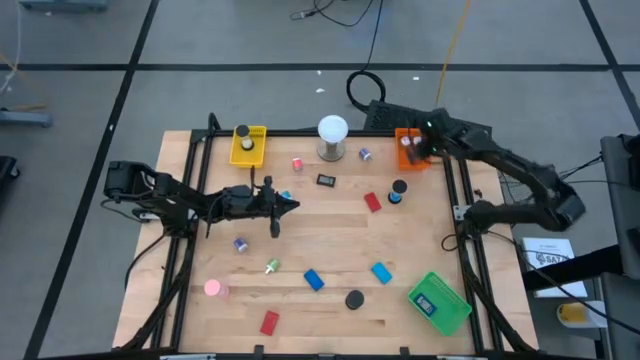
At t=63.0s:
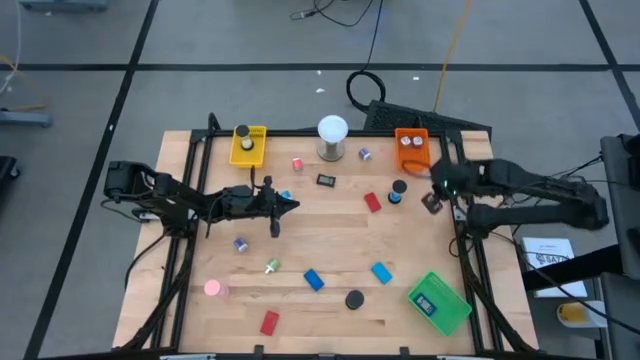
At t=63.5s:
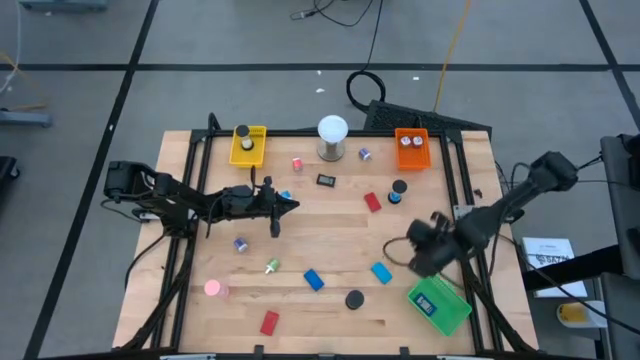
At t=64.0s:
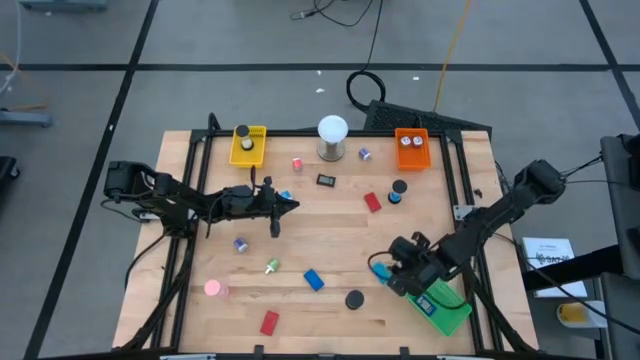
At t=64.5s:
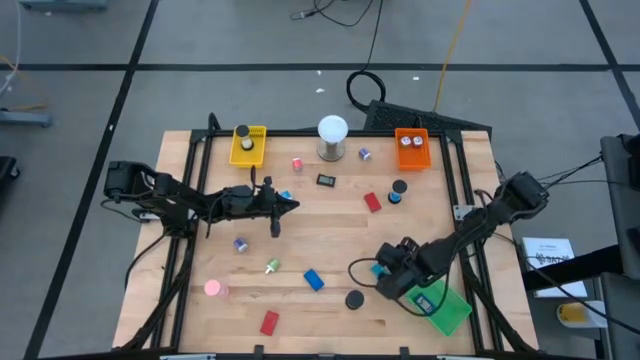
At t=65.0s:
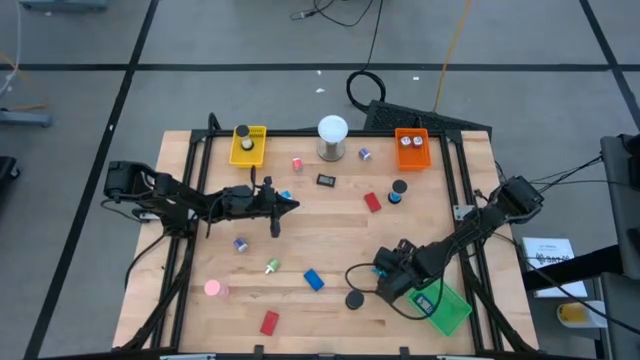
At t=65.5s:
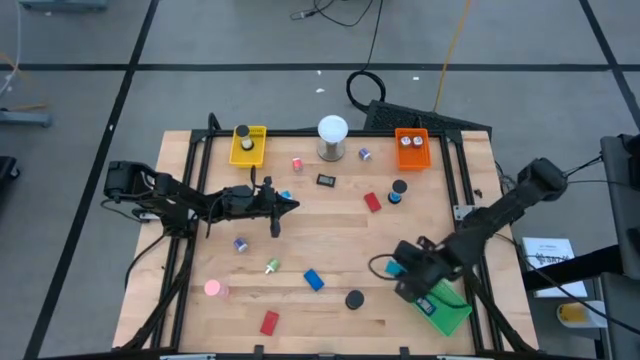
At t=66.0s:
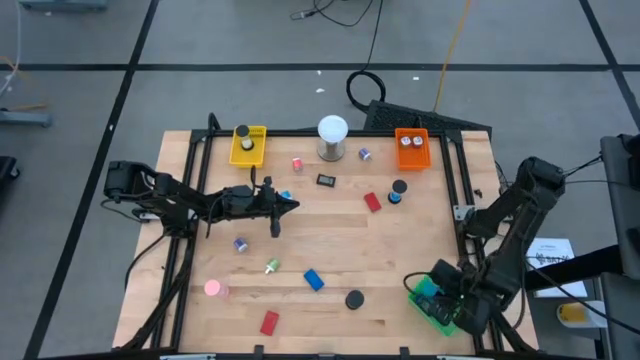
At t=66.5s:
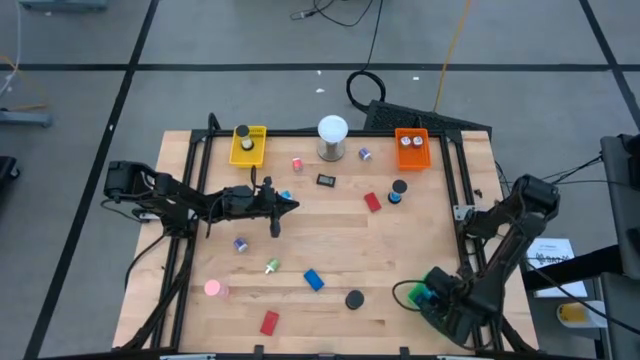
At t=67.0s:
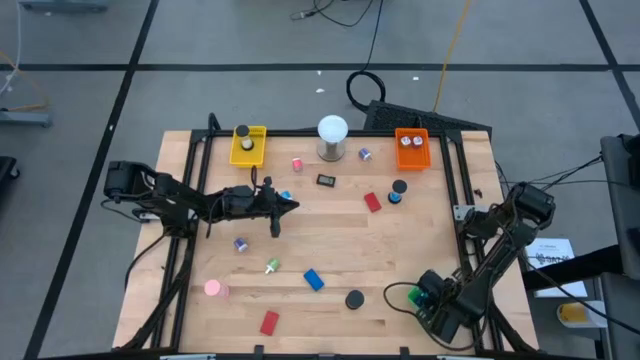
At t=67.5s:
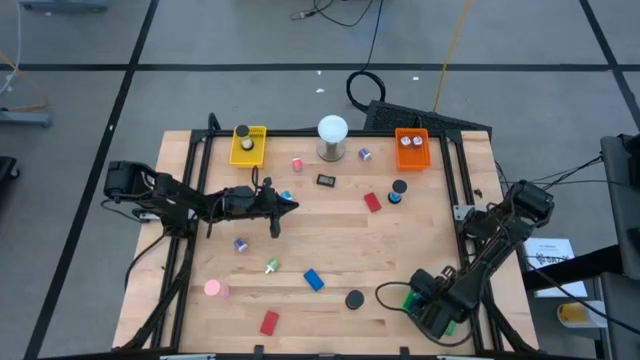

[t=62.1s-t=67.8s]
Task: Pick & Place Office items
Put the light blue digital clock into the green bin

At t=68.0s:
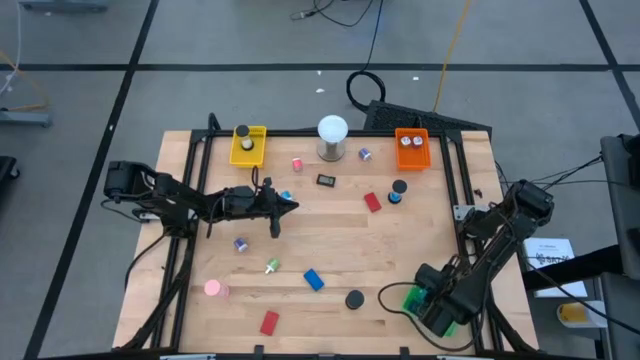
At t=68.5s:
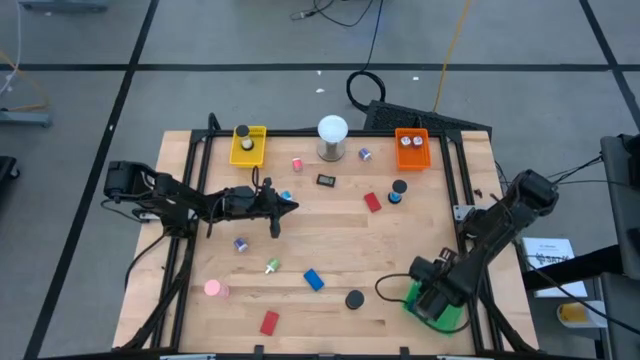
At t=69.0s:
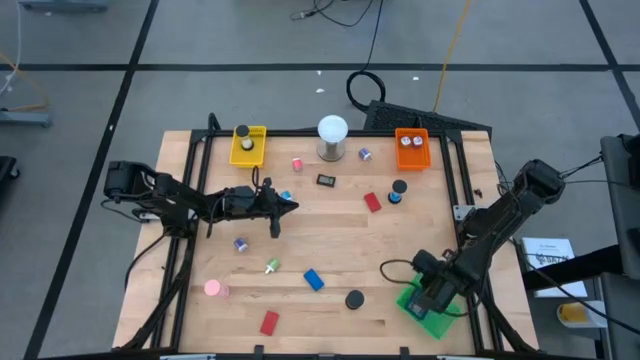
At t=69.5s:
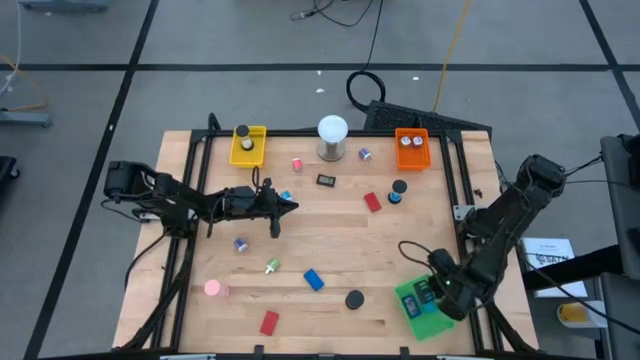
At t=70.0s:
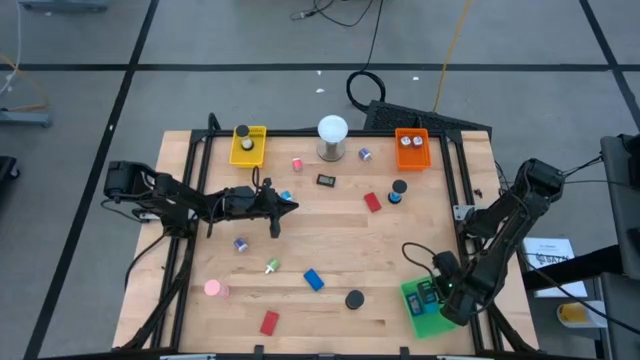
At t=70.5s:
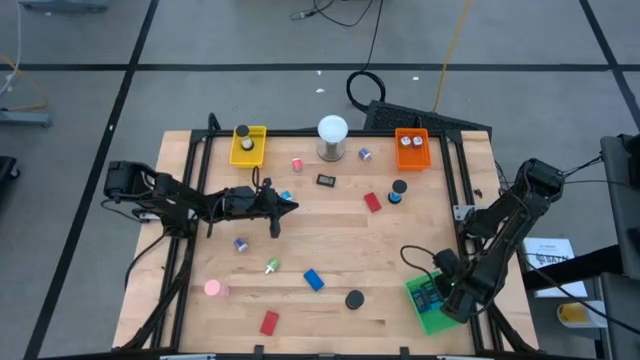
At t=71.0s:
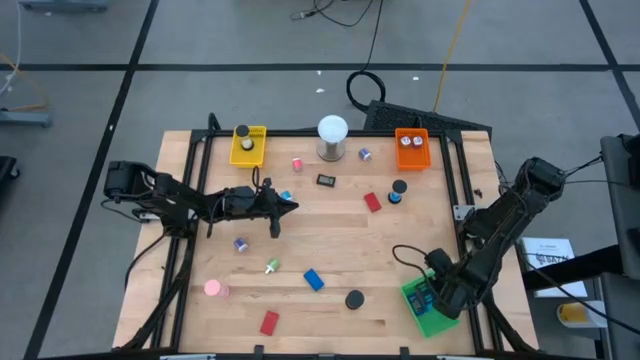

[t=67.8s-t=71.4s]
Adjust the green bin

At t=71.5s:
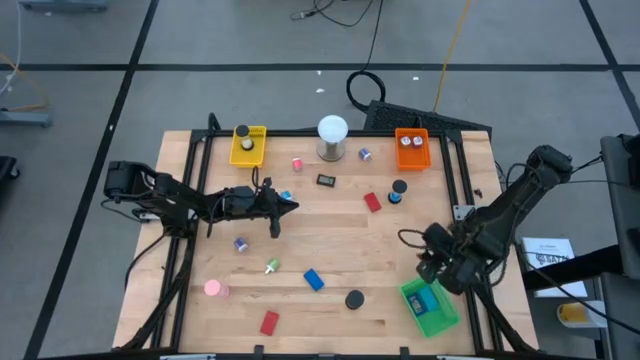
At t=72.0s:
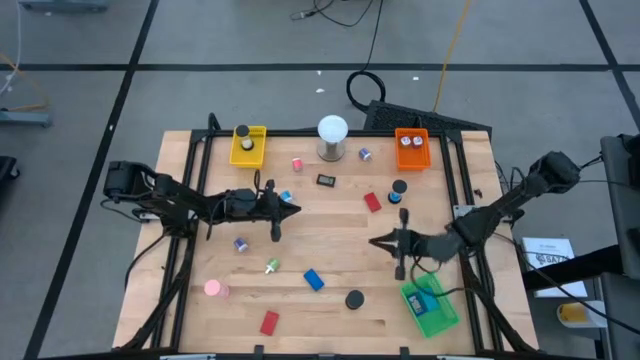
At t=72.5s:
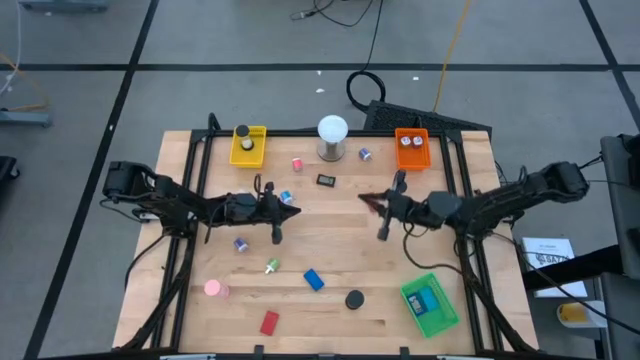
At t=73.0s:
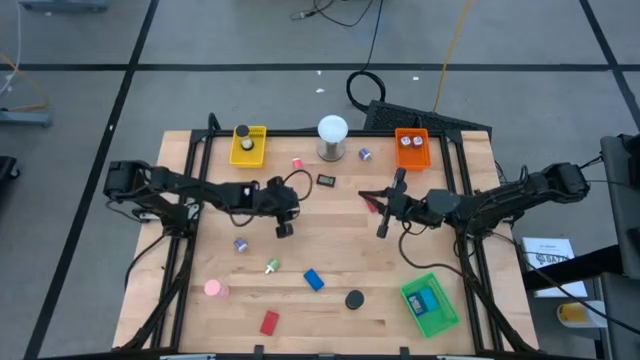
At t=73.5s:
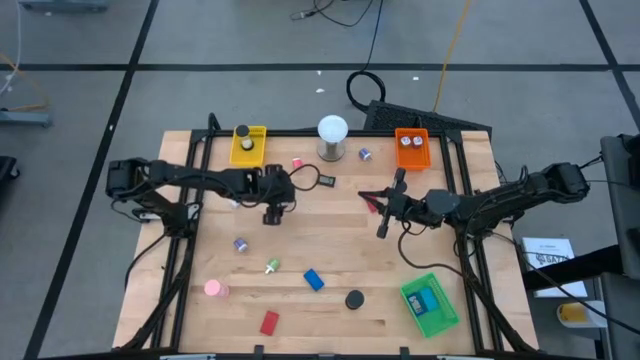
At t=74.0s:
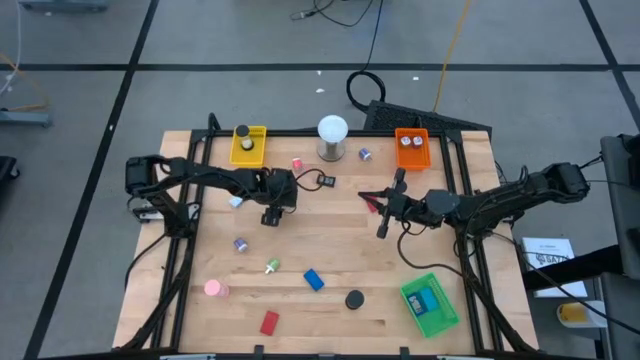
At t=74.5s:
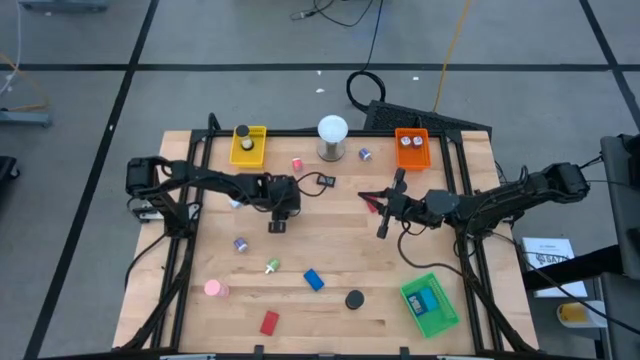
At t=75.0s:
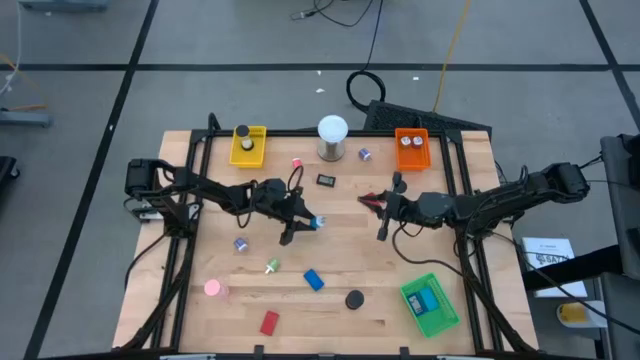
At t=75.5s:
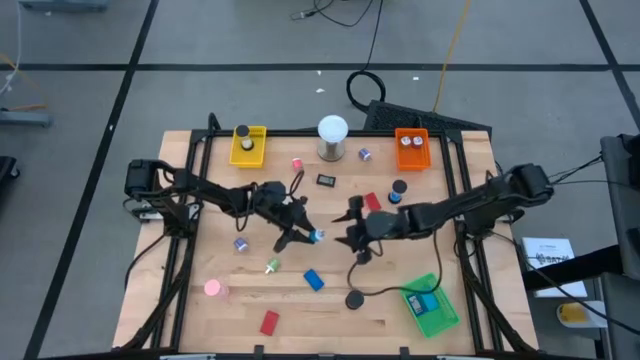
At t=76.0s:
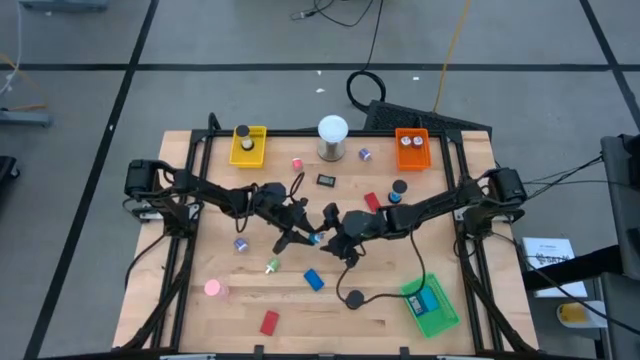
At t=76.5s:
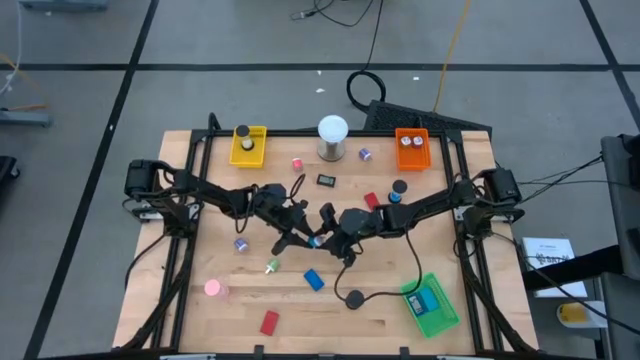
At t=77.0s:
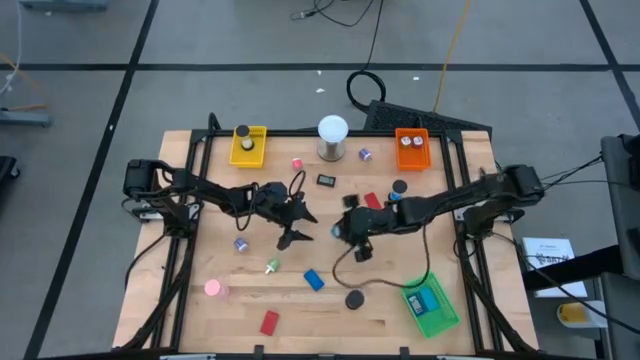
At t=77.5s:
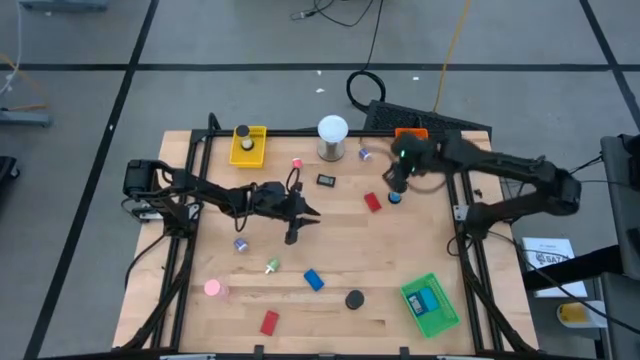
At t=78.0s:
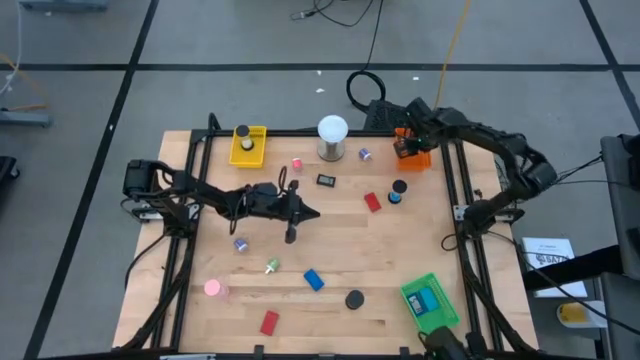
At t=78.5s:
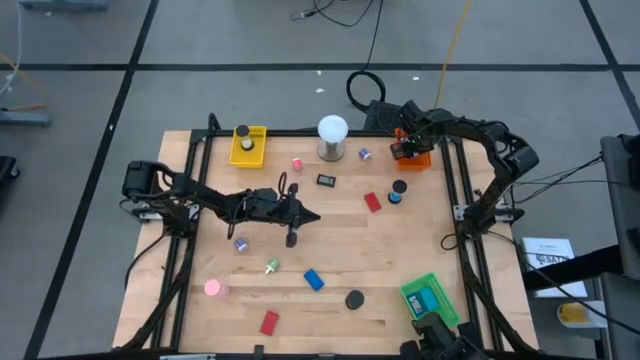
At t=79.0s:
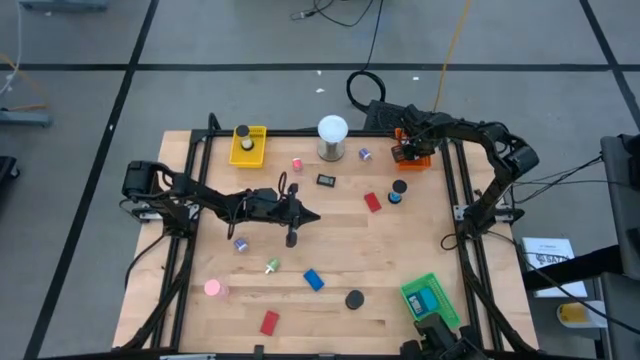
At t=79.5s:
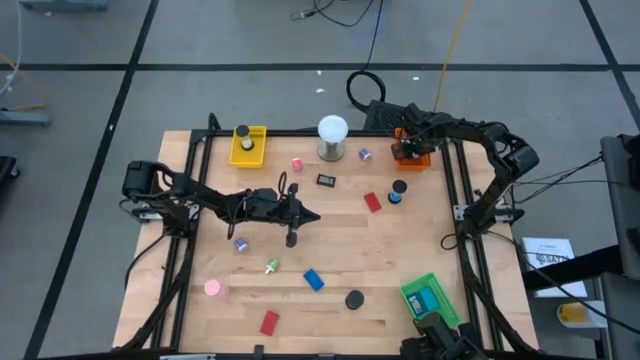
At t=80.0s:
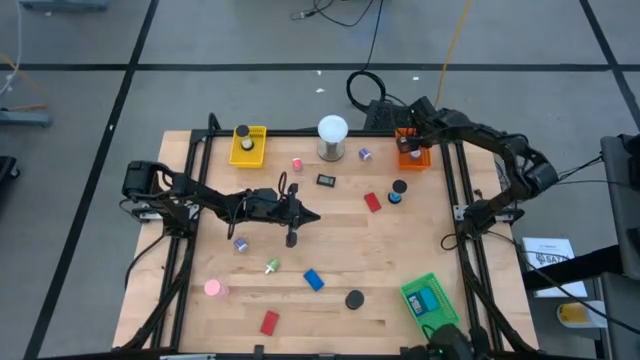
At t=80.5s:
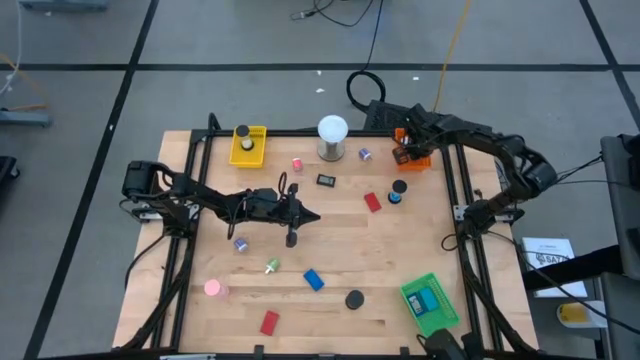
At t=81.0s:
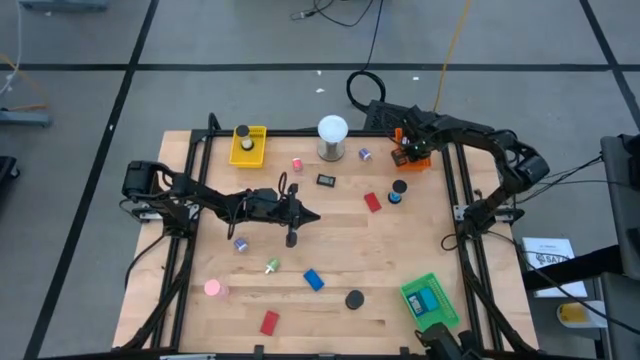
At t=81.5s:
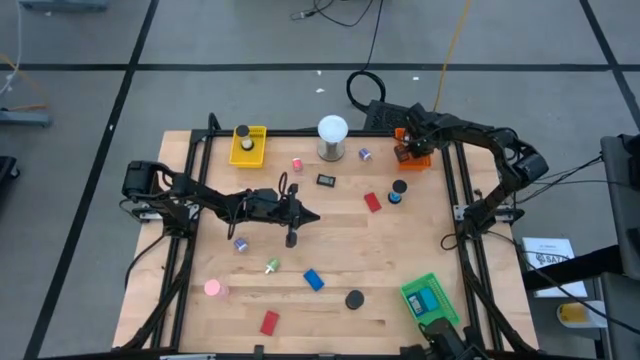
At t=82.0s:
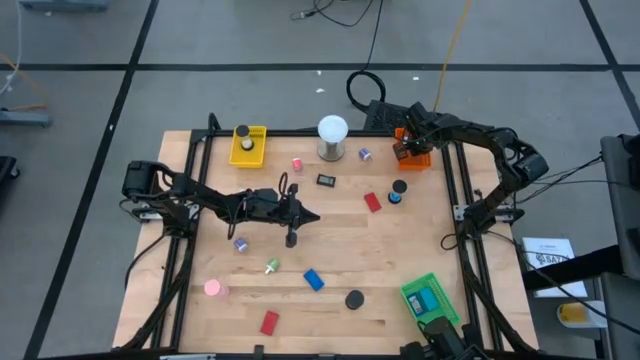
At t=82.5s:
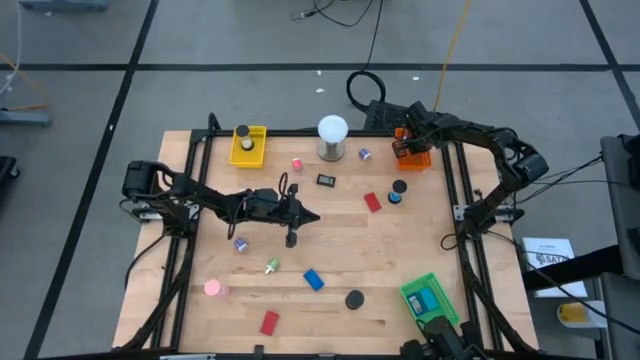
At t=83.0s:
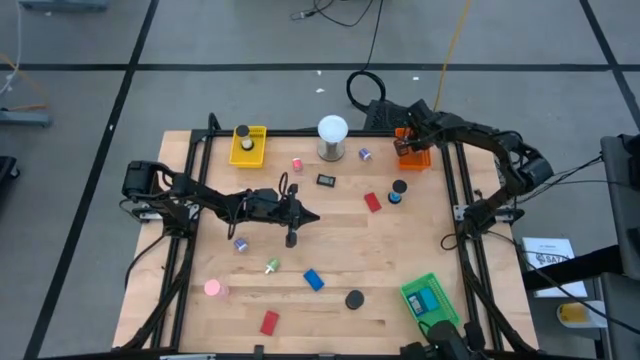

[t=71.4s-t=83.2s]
Put the blue charger adaptor into the orange bin
